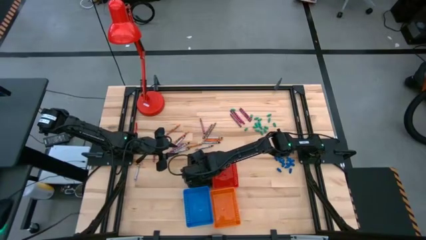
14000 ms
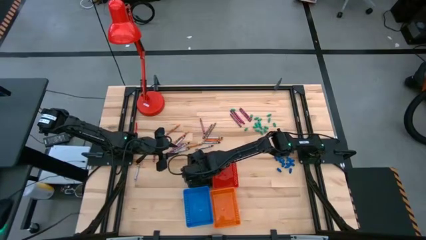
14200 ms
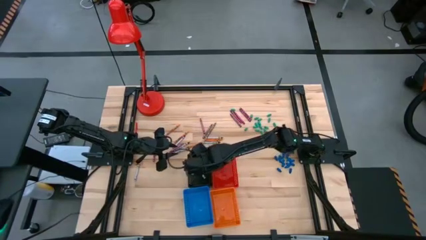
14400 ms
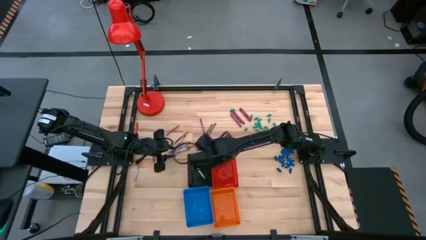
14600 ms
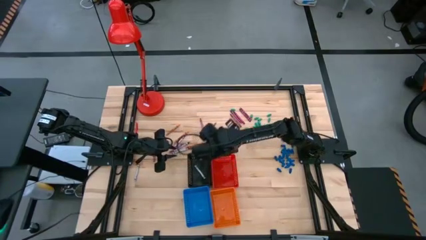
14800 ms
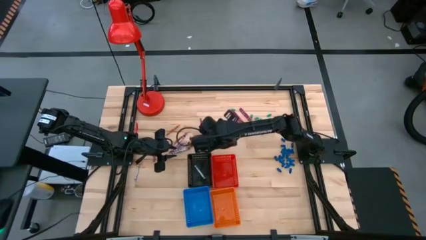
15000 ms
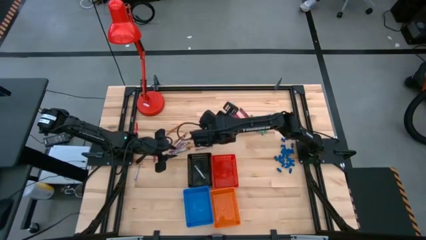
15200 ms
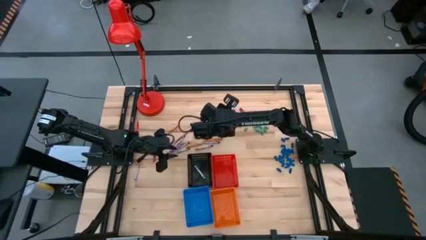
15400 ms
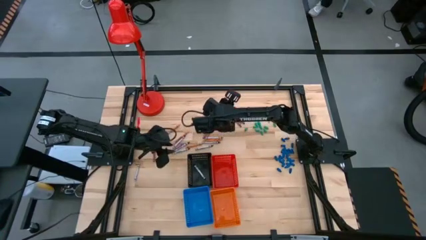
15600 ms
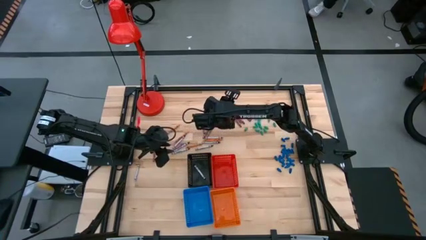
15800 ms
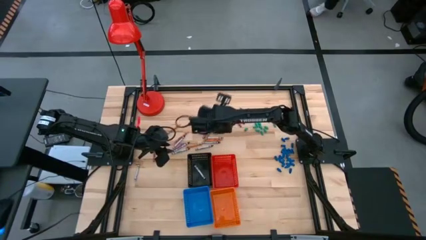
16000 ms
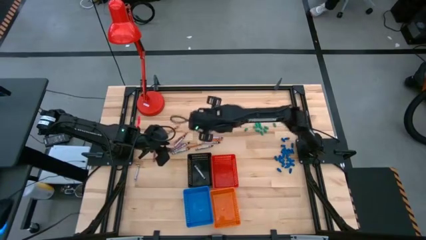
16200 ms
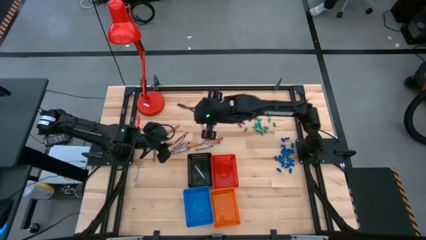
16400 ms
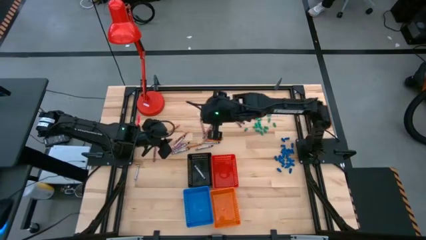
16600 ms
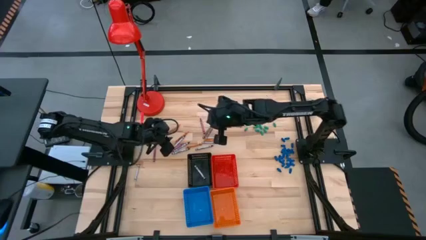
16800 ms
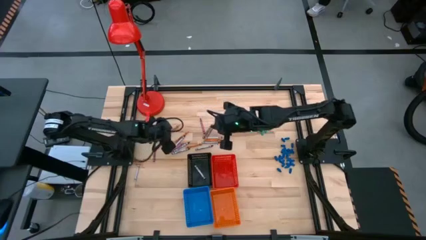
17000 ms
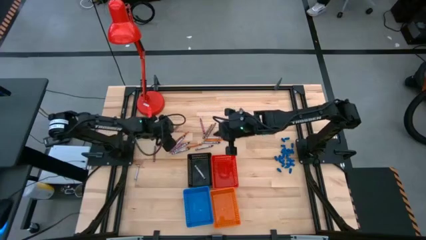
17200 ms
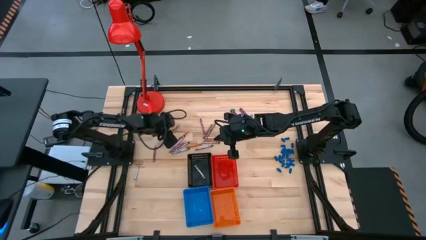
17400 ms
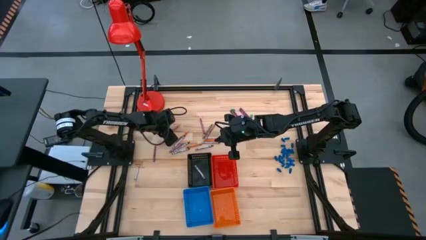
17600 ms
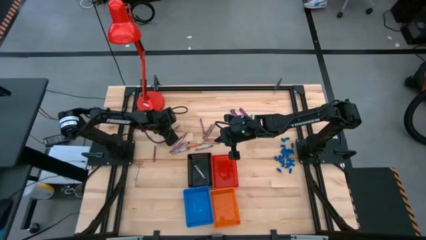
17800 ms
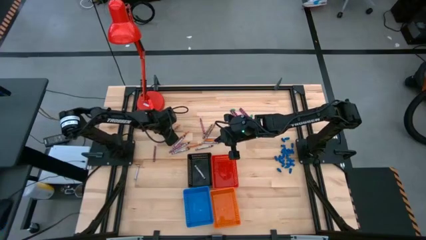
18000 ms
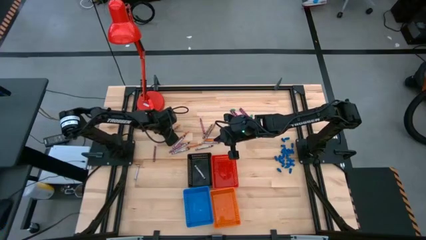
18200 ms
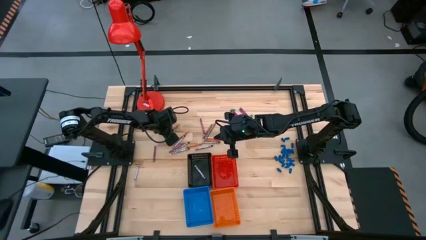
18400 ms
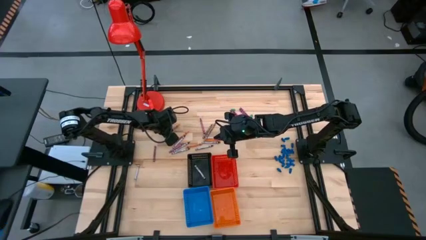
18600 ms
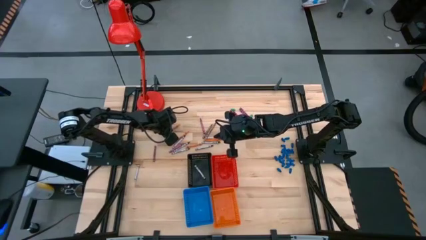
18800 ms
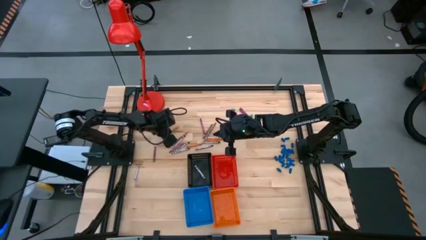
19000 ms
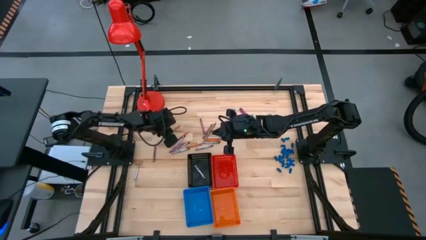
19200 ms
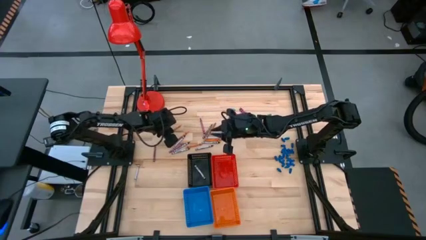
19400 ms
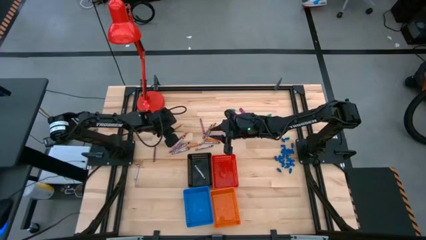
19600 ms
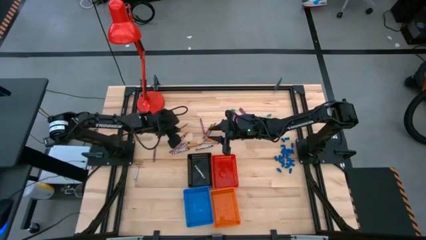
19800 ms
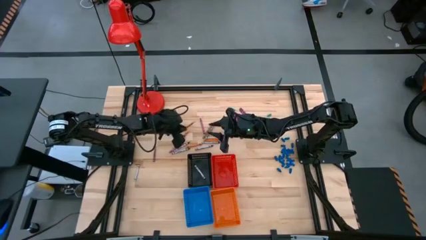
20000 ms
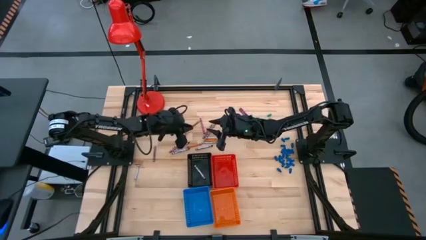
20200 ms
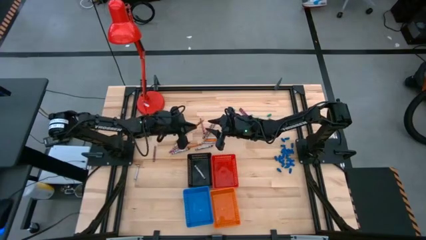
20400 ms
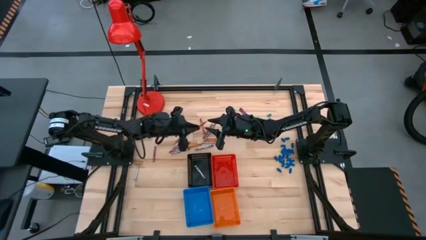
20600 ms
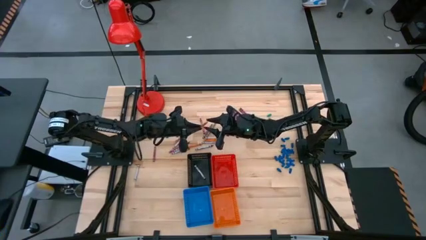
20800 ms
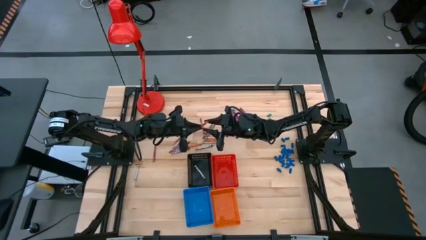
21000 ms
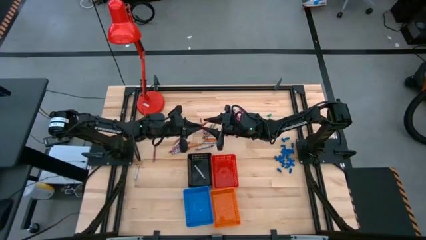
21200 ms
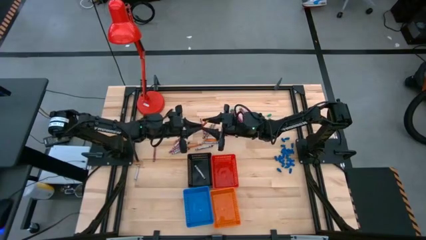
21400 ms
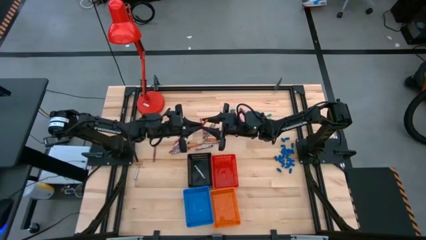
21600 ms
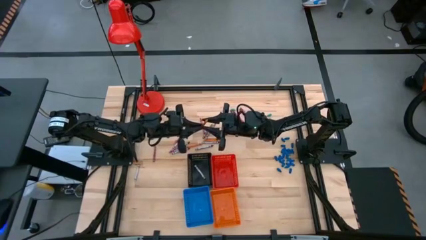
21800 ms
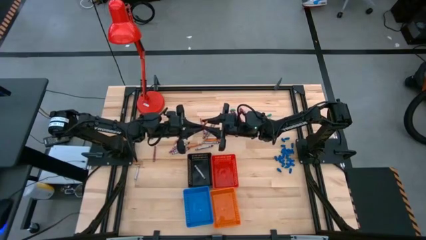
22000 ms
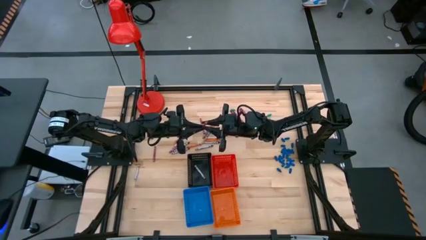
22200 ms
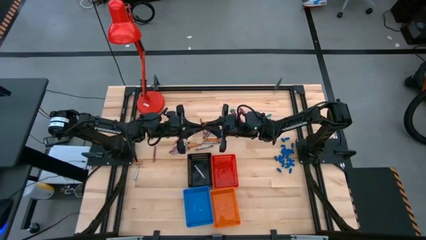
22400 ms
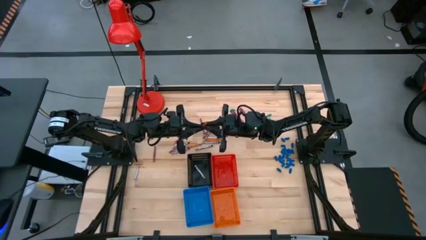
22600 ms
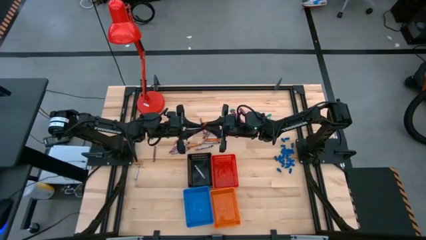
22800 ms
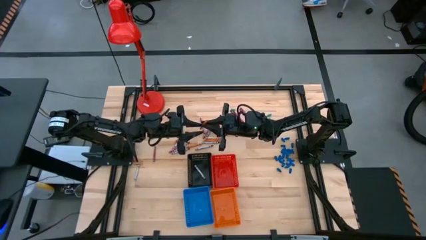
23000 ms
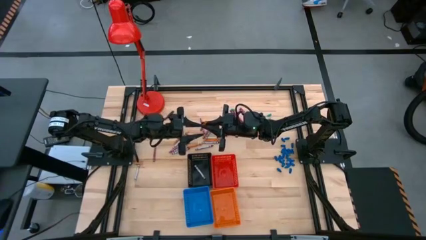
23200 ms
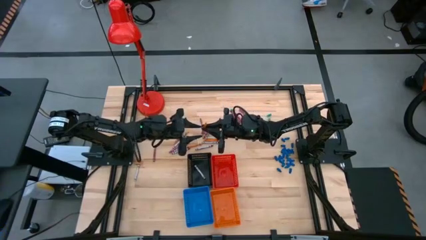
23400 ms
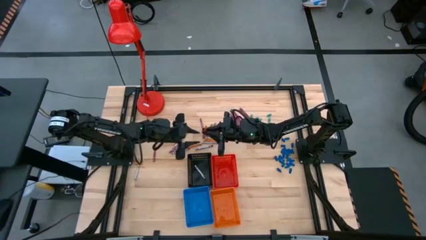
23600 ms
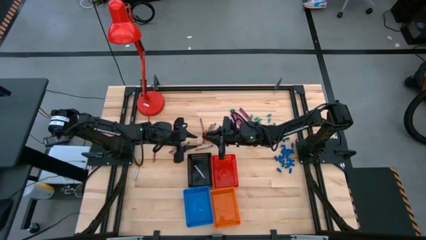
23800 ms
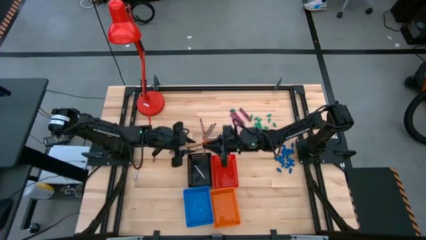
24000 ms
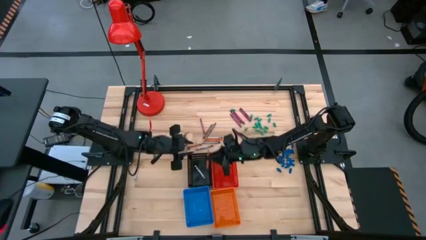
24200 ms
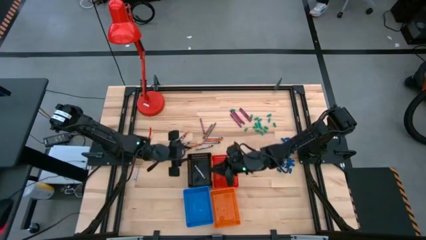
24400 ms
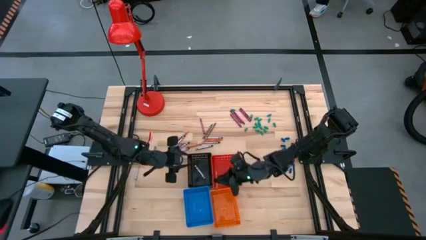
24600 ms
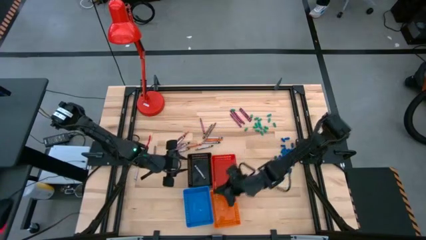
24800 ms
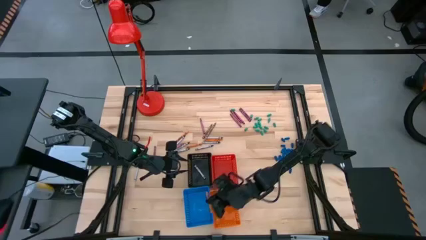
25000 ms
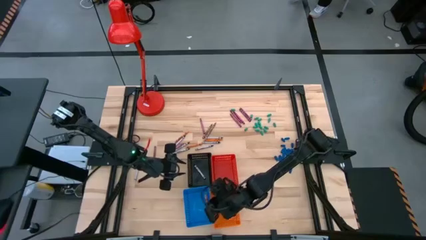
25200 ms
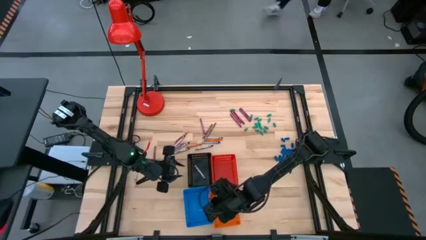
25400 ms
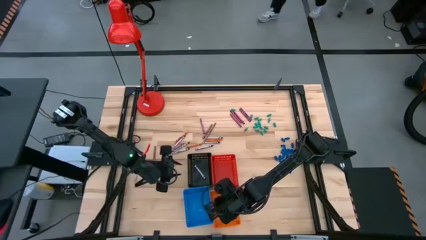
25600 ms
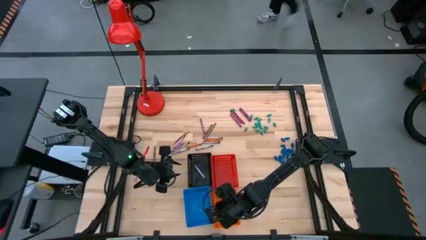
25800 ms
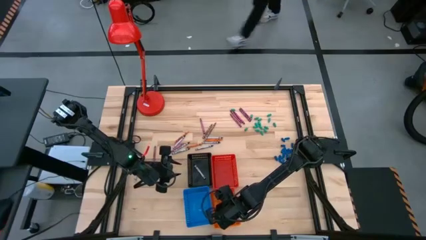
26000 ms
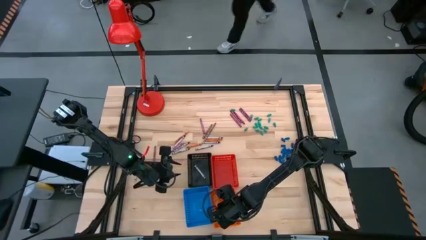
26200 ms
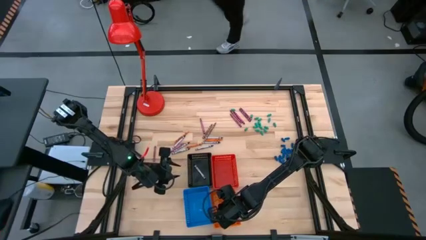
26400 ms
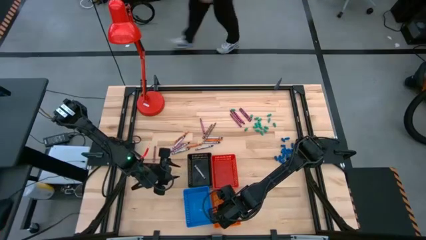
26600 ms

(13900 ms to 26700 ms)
Task: Sort crayons
Put the orange crayon into the orange basket
